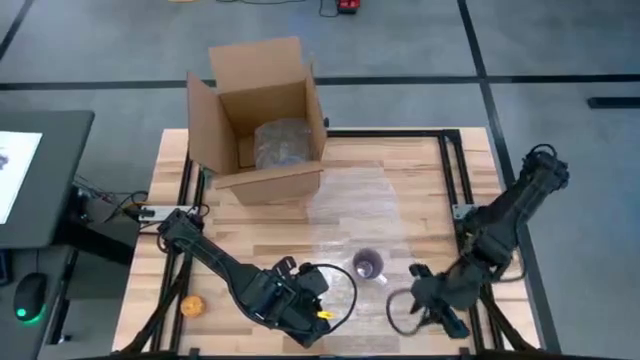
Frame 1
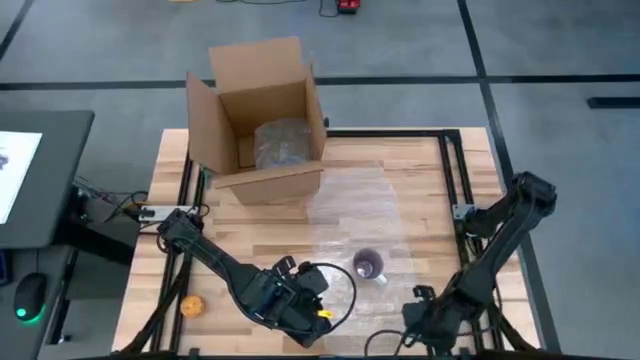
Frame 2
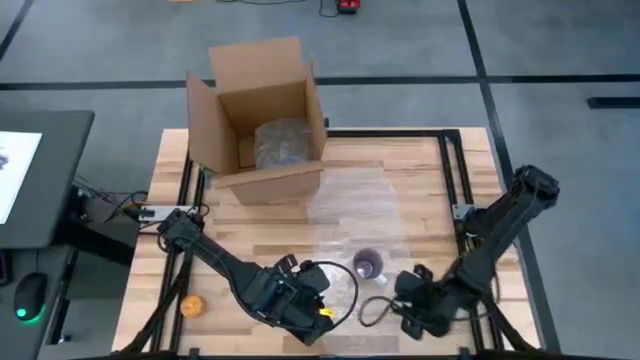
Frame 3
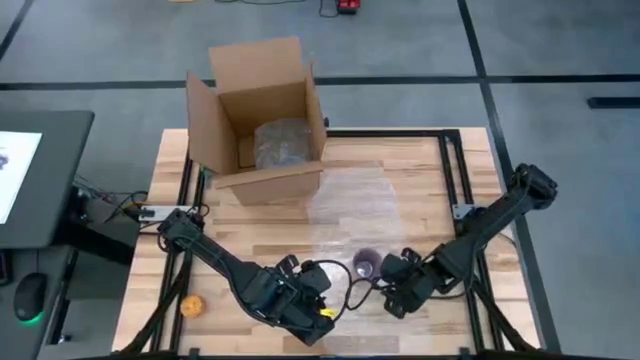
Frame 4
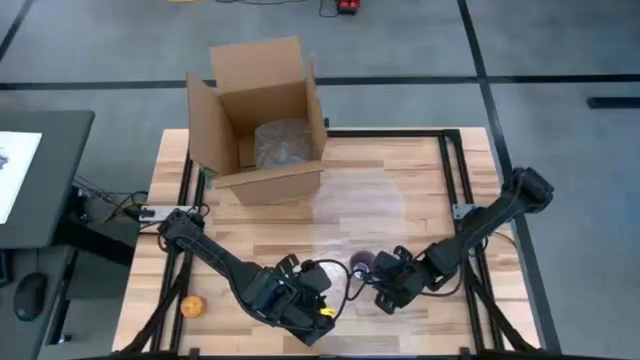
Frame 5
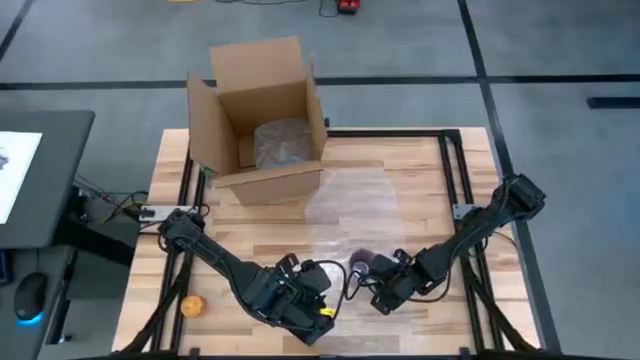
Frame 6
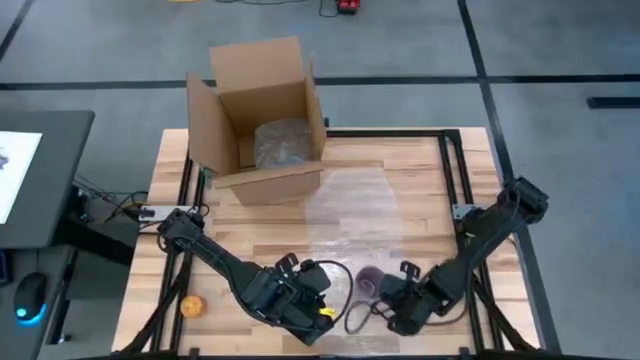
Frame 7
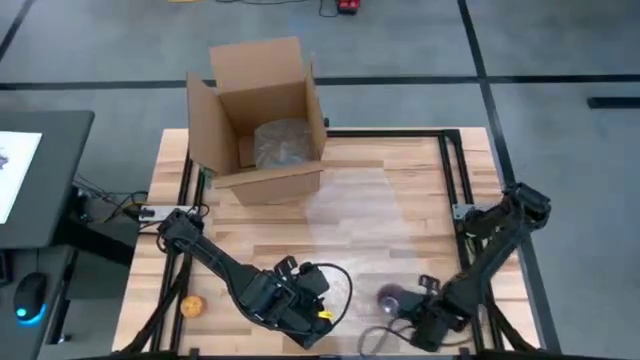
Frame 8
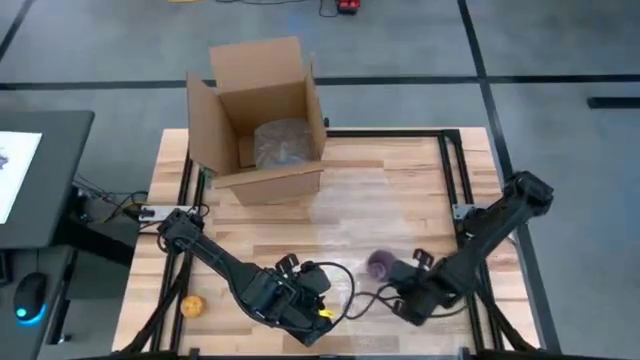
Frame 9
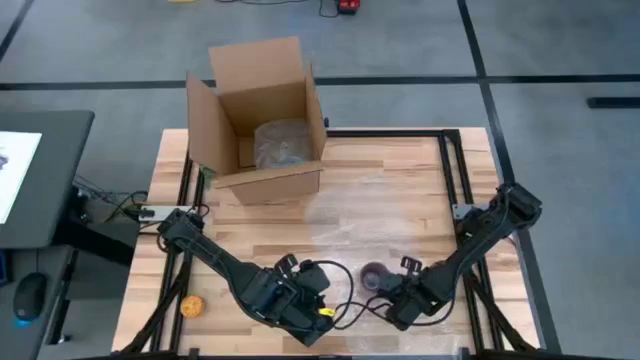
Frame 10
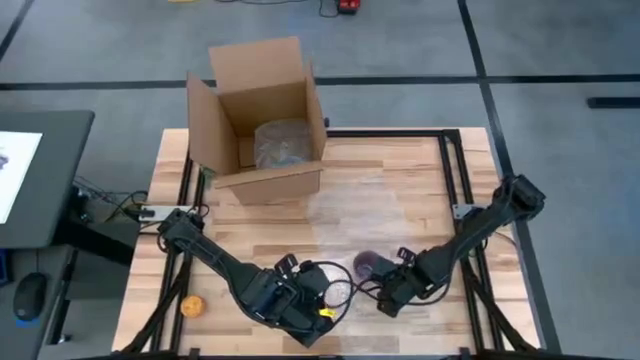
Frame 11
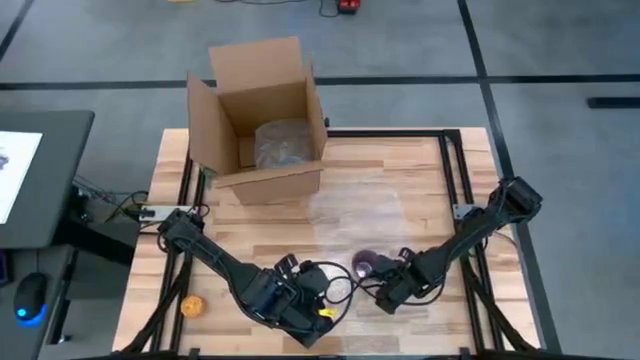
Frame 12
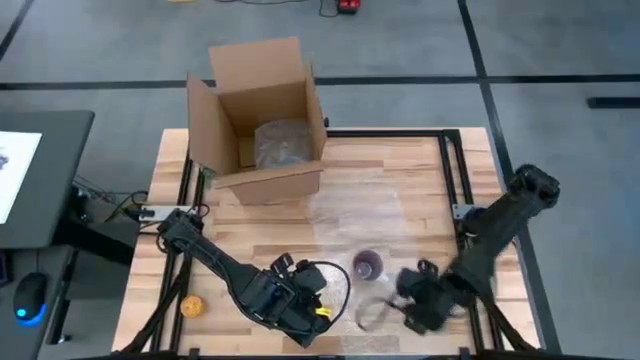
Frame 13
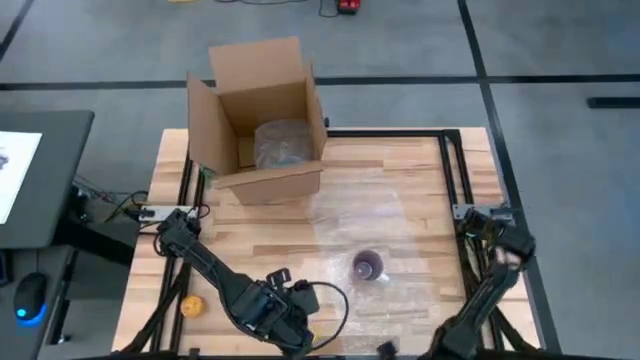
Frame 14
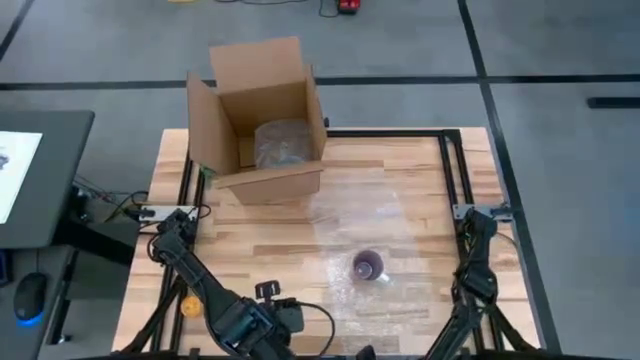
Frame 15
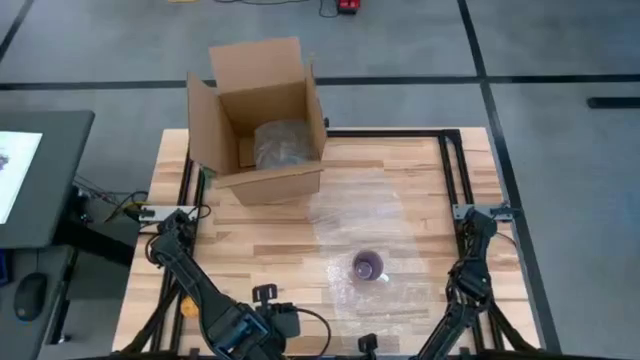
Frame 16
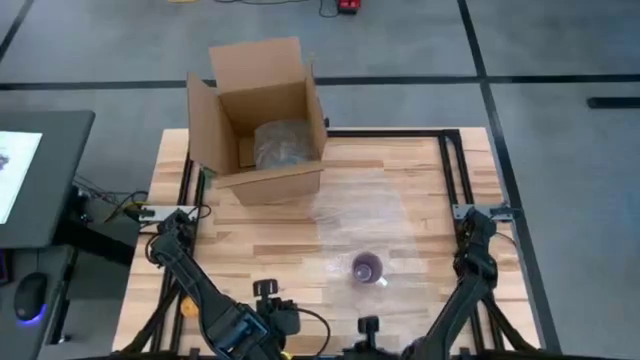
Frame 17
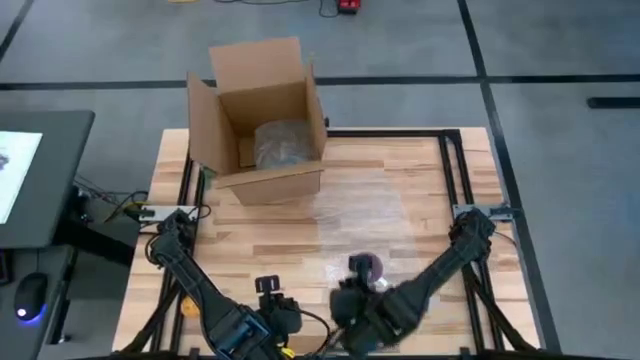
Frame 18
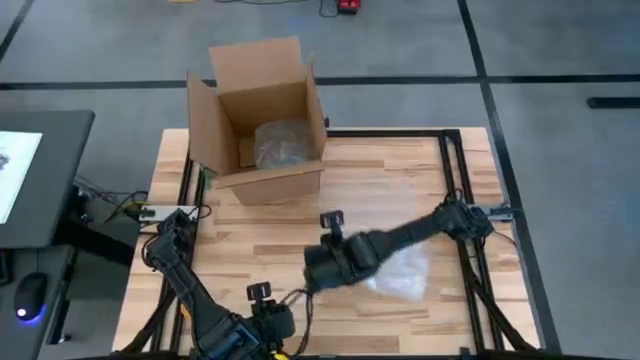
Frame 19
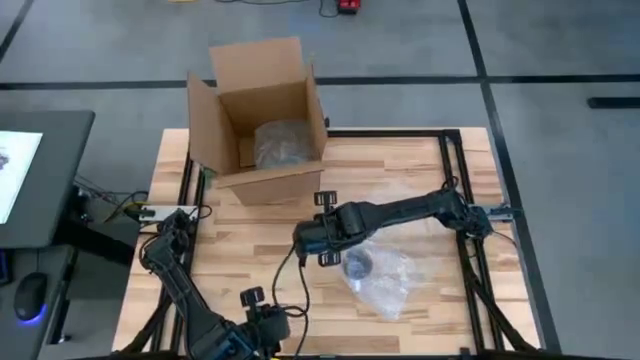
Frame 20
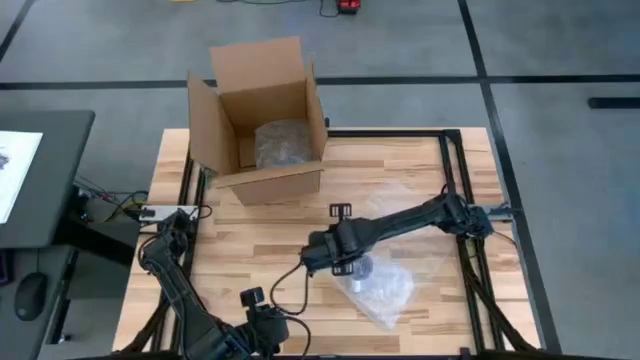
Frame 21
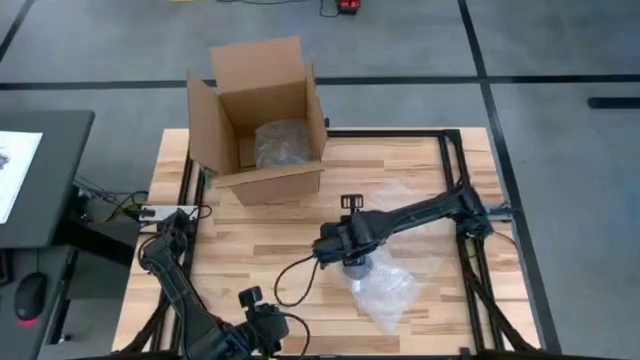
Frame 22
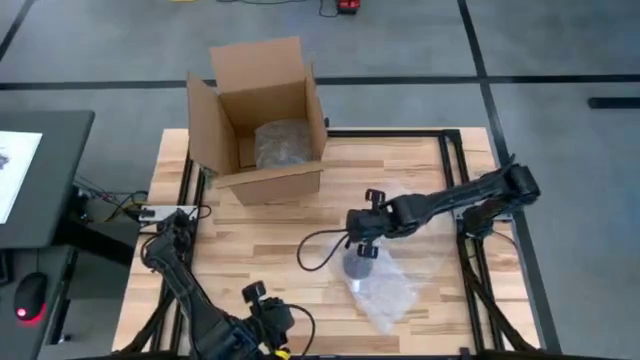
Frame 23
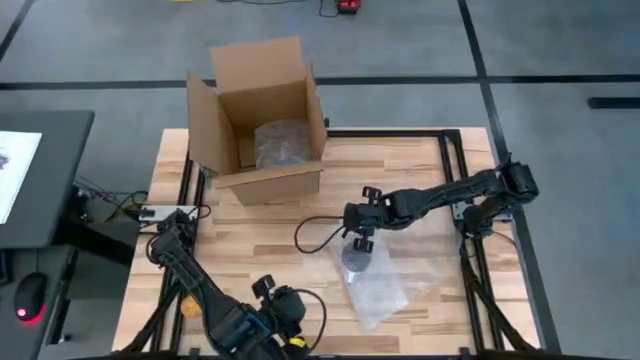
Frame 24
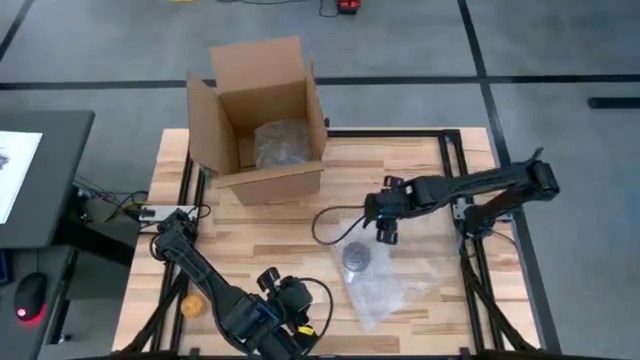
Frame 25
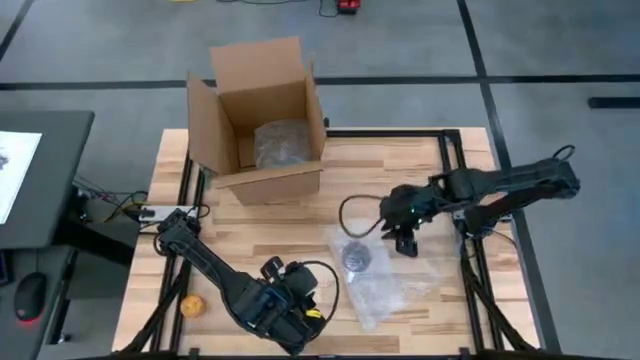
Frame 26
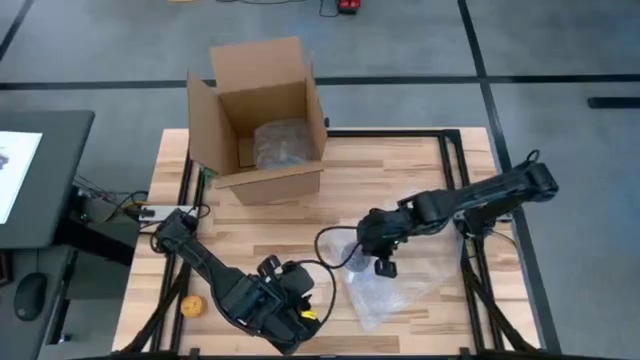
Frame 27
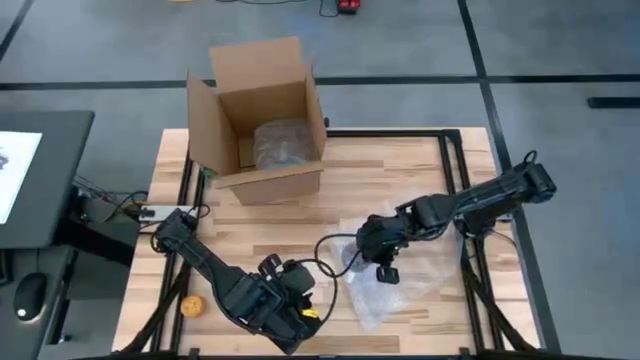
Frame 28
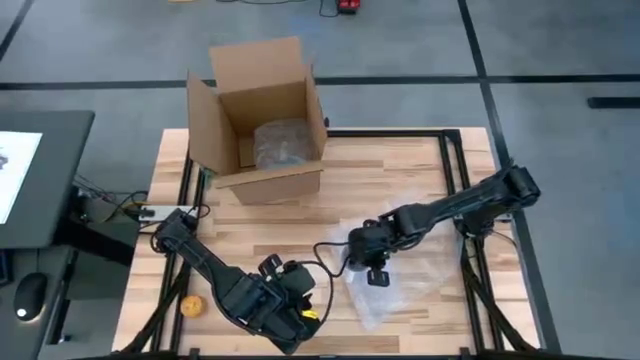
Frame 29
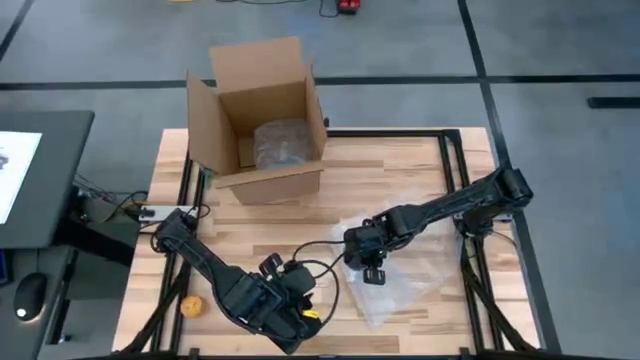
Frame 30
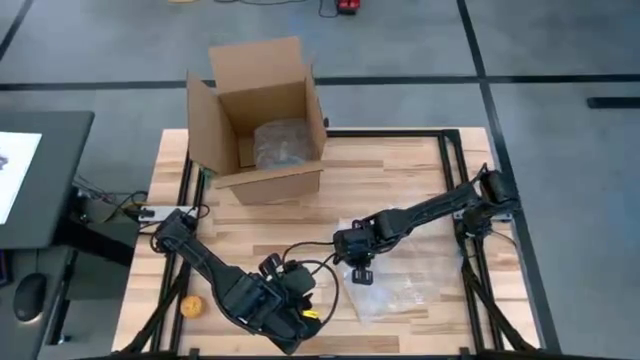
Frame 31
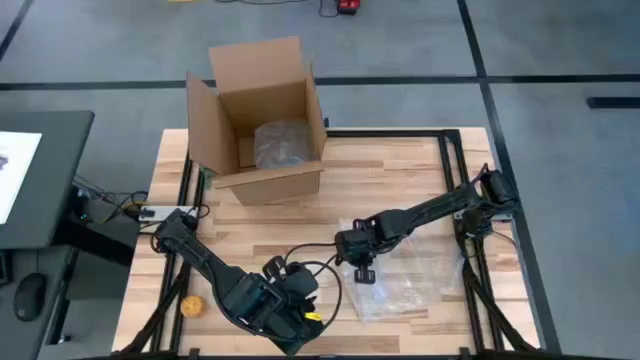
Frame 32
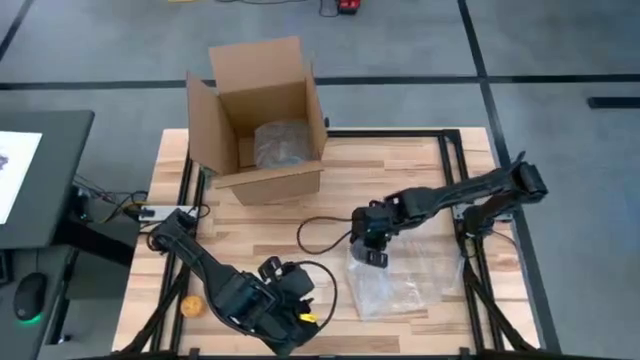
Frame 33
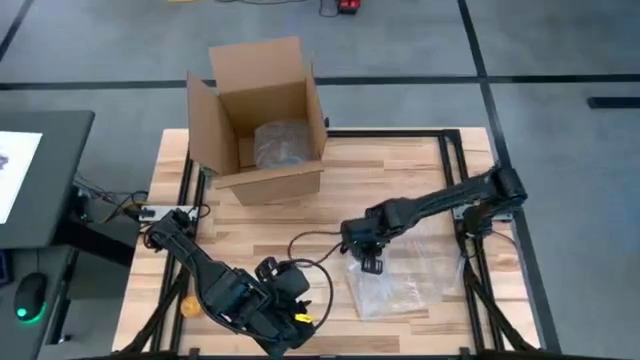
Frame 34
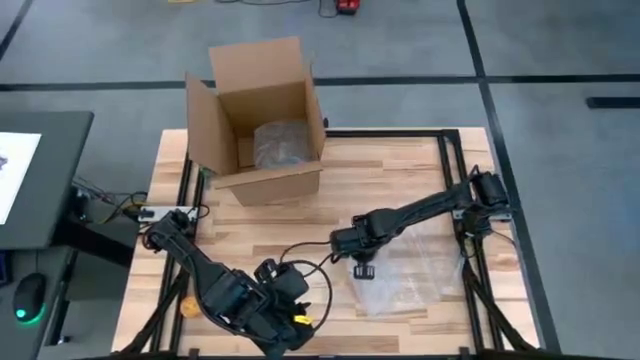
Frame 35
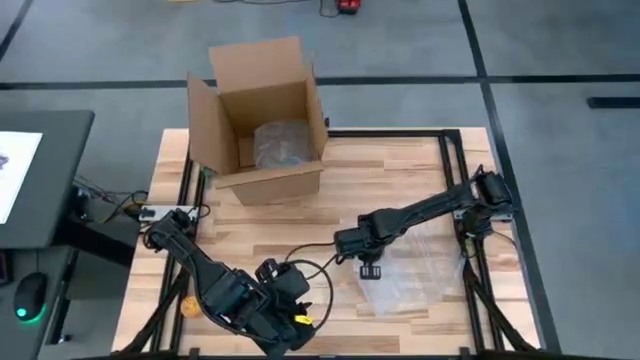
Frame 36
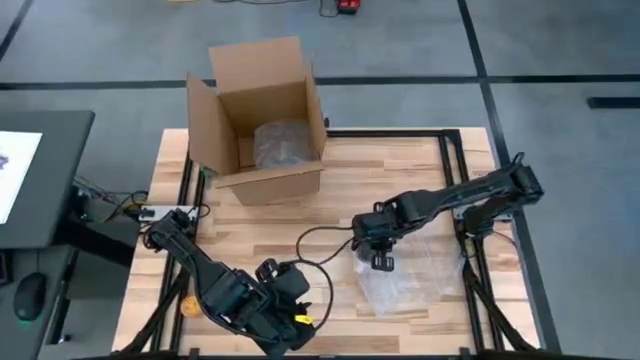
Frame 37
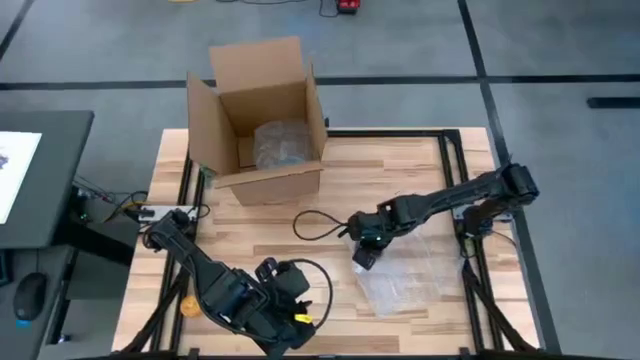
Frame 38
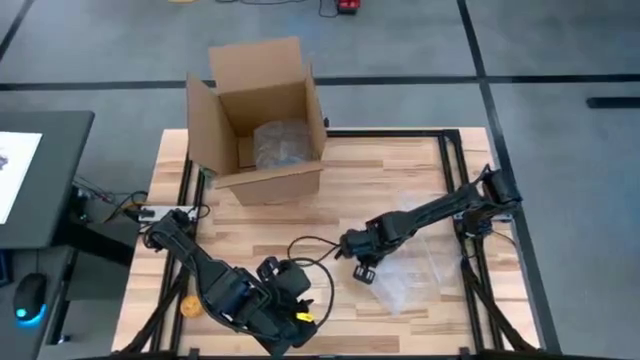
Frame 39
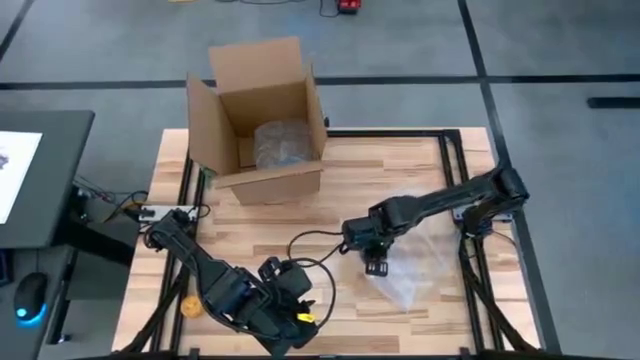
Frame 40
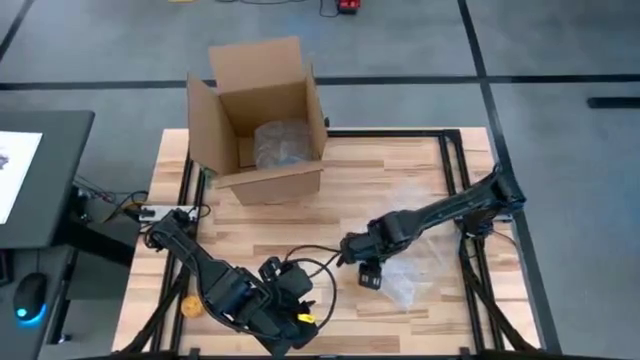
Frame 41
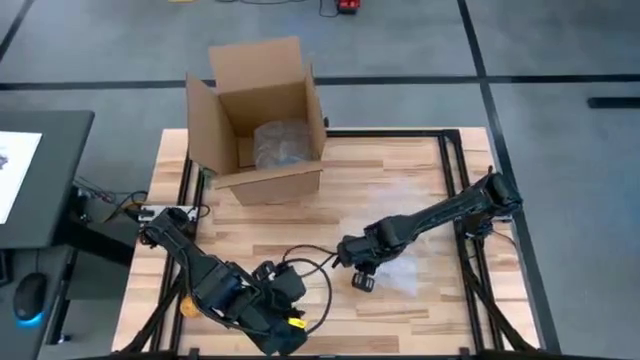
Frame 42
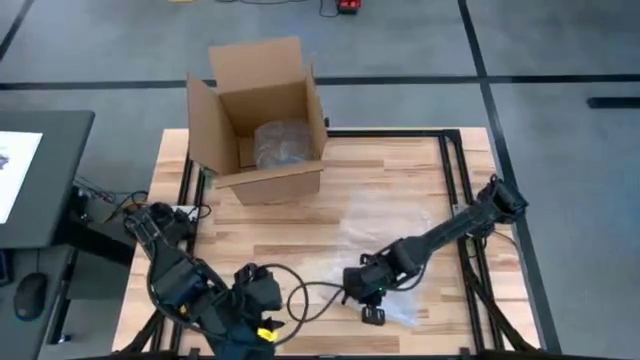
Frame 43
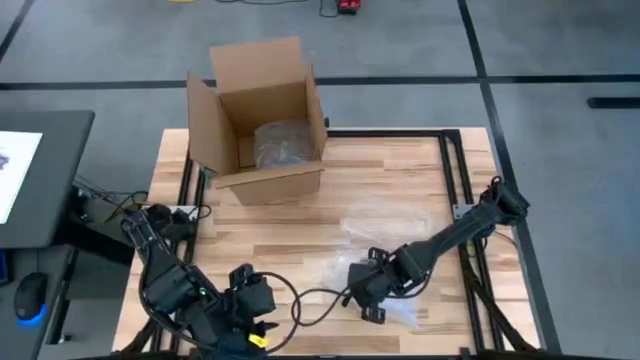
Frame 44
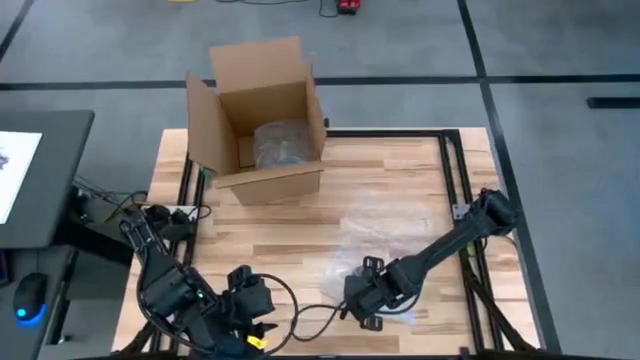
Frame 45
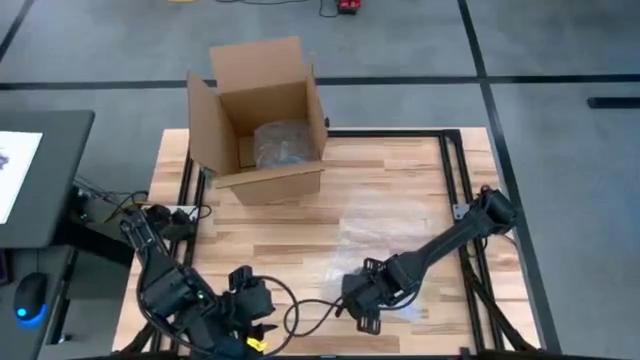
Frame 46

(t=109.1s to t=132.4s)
Task: wrap mug
Wrap the purple mug with the bubble wrap
